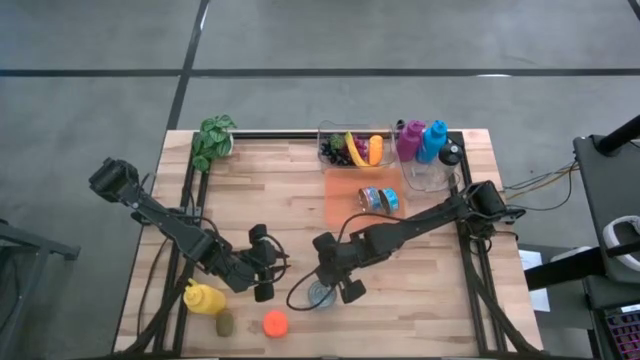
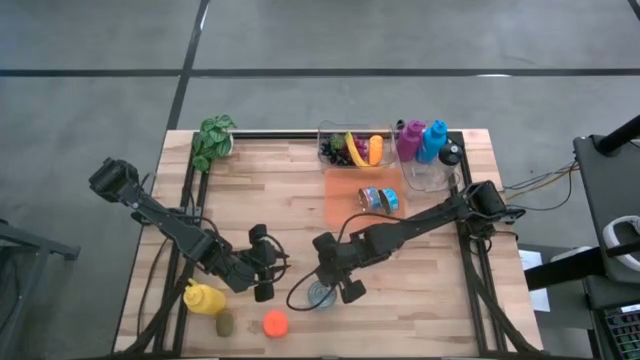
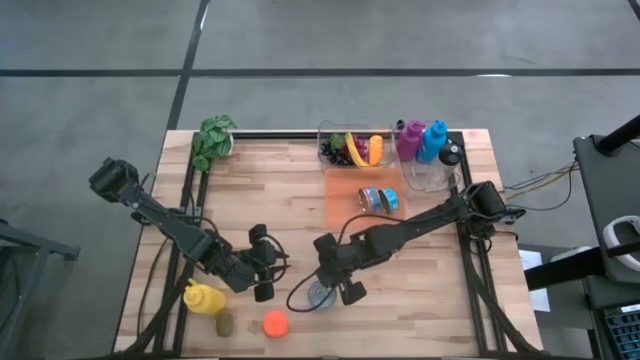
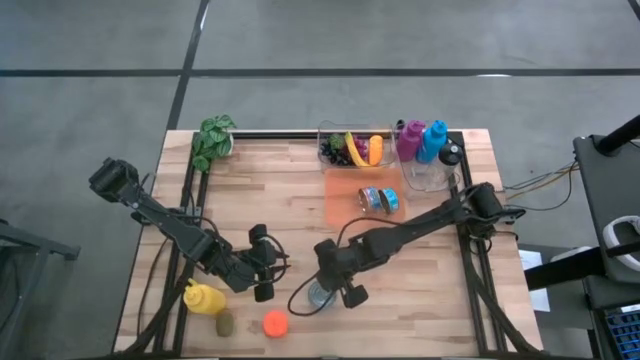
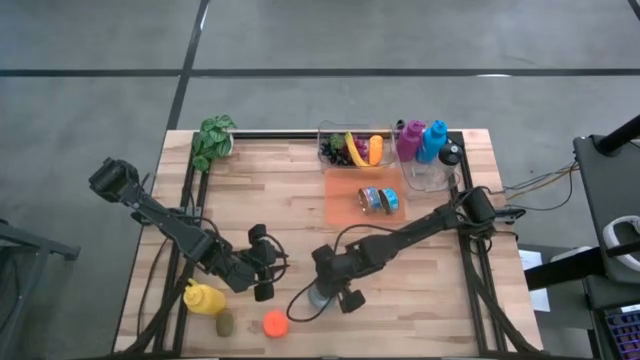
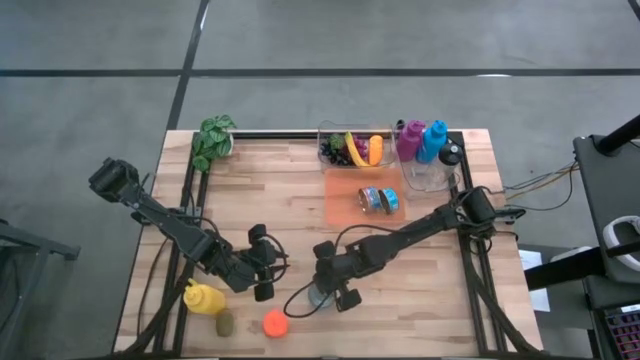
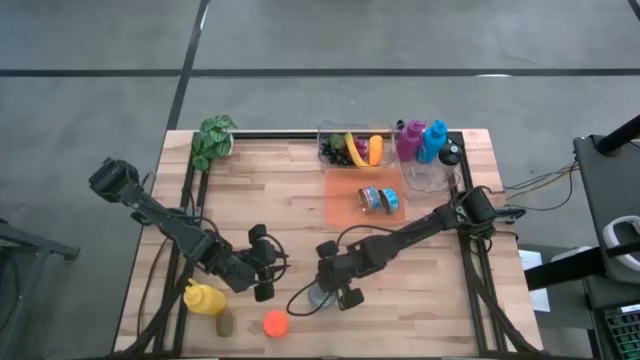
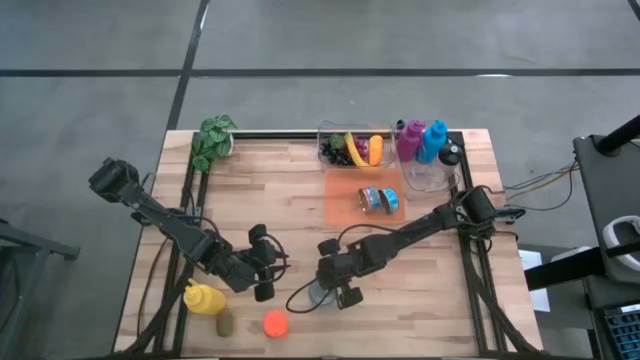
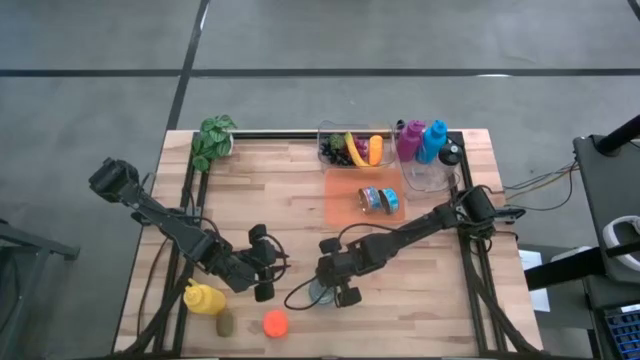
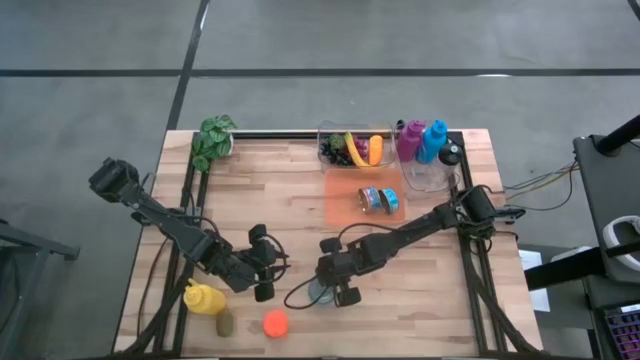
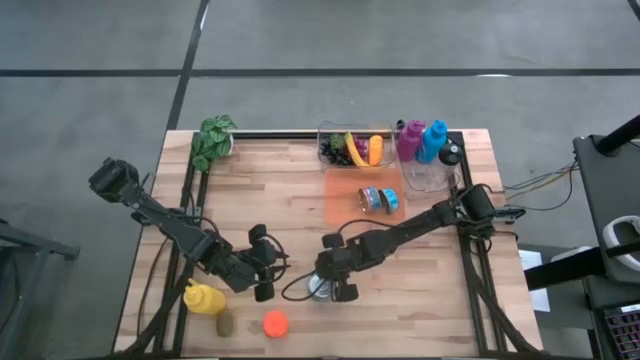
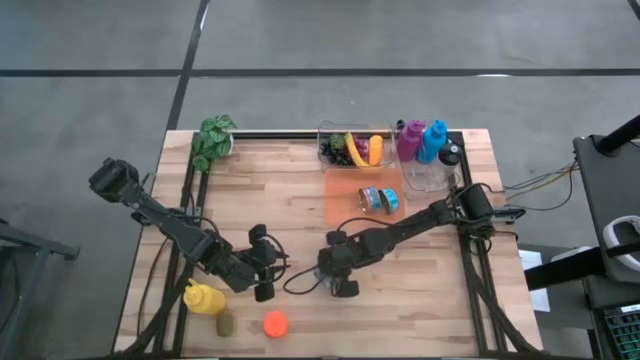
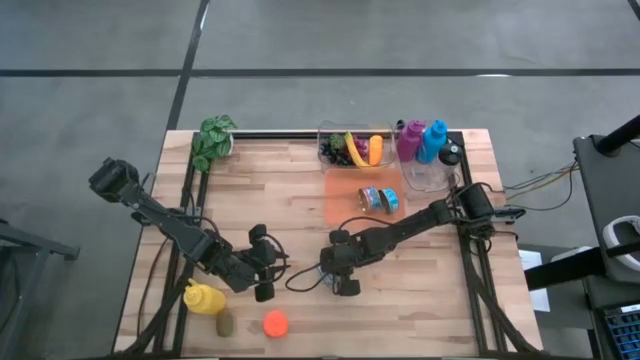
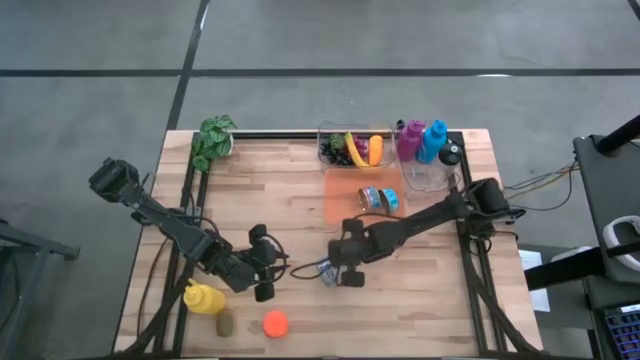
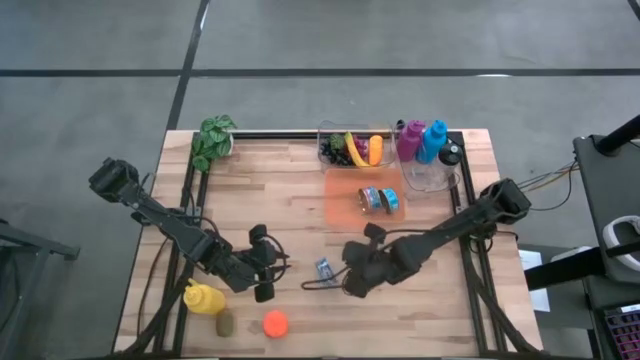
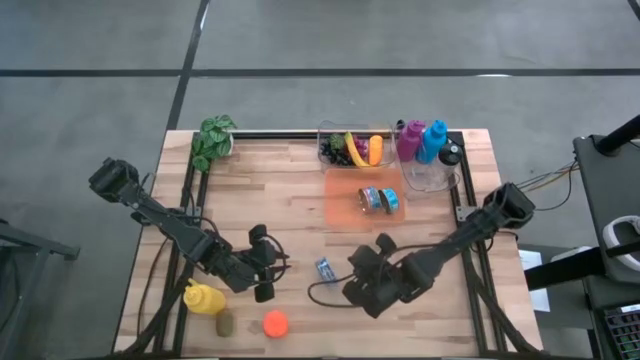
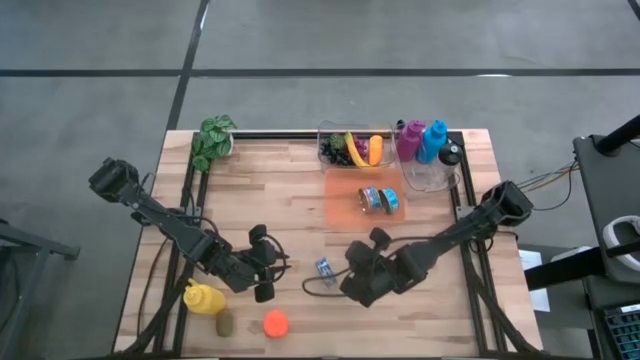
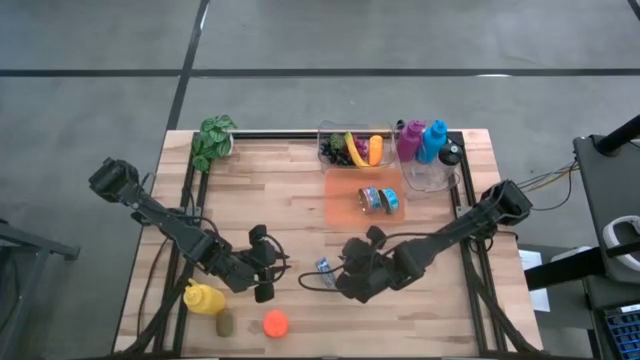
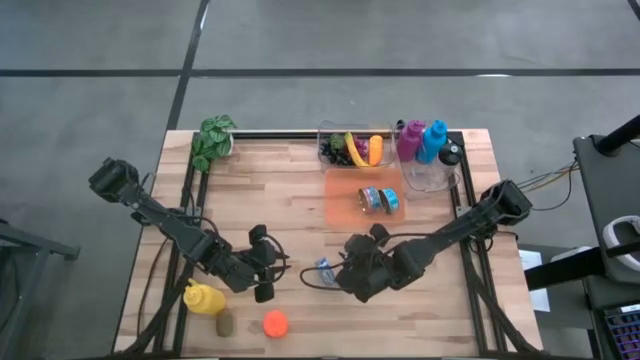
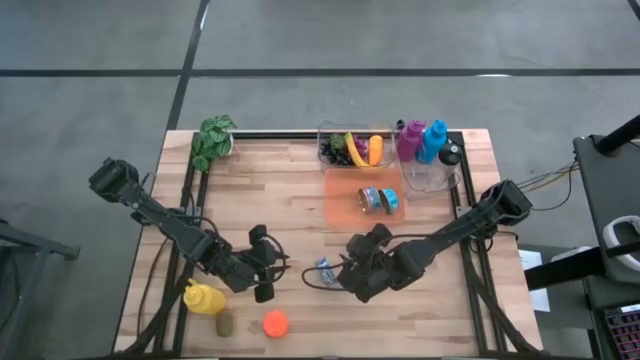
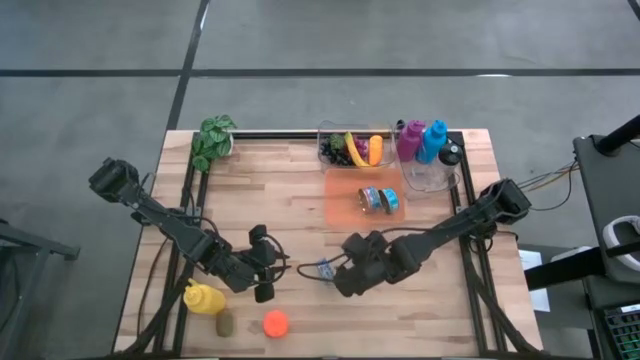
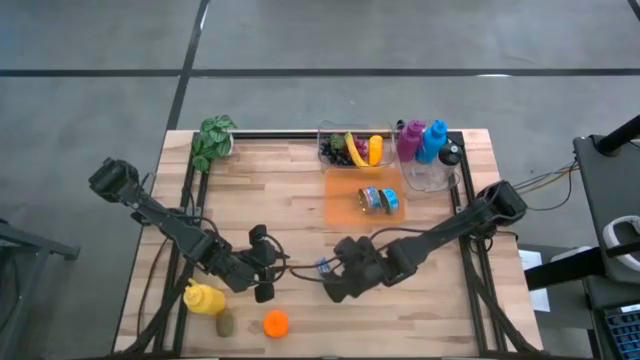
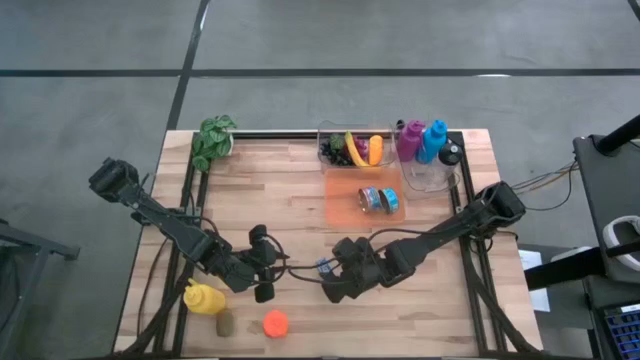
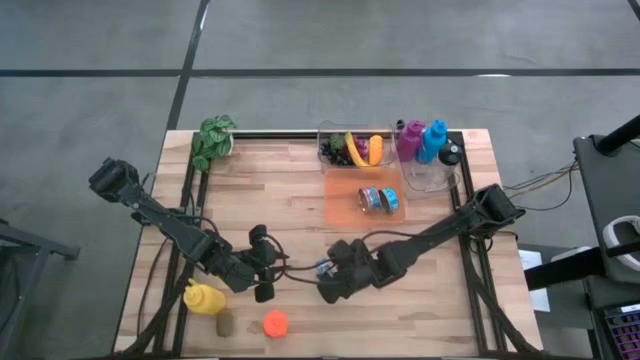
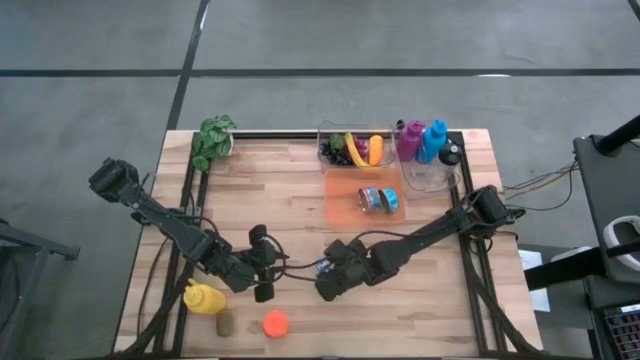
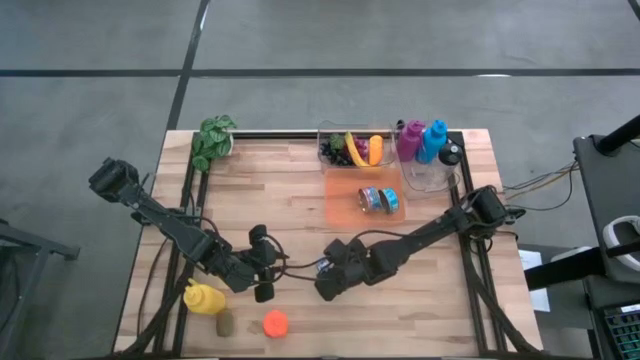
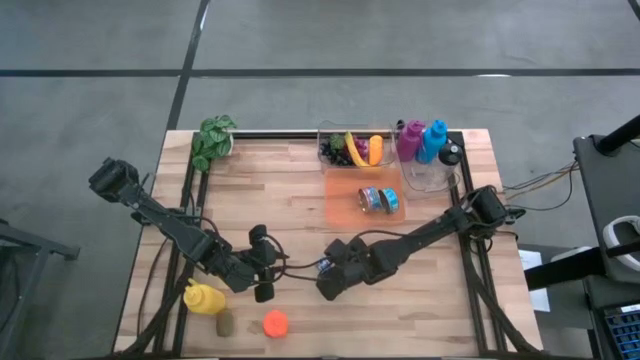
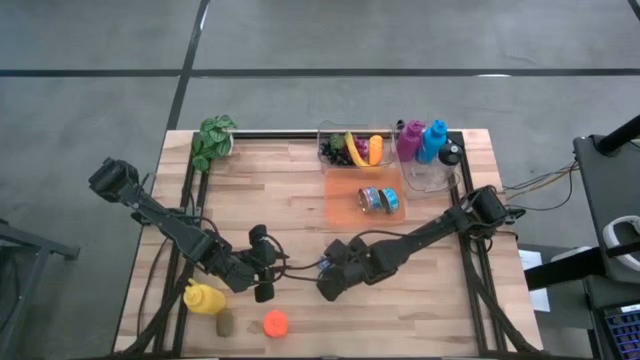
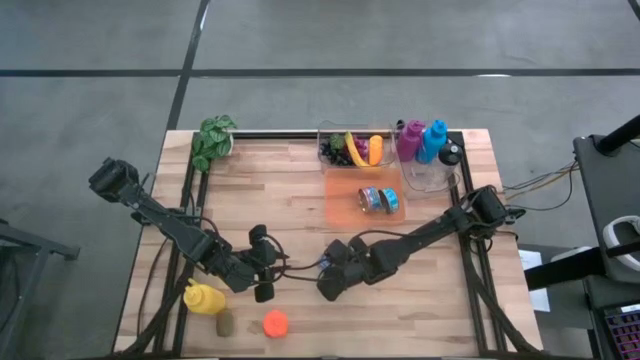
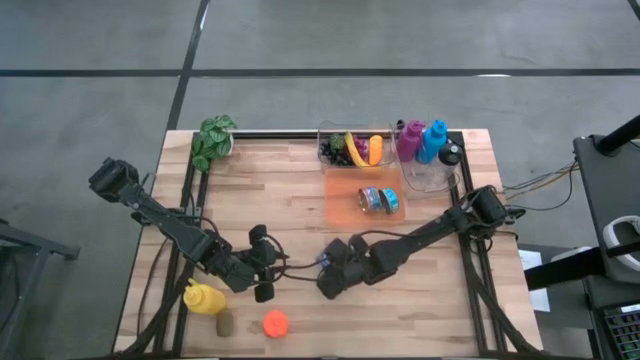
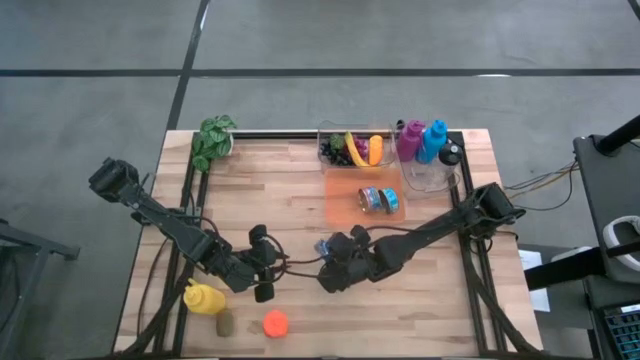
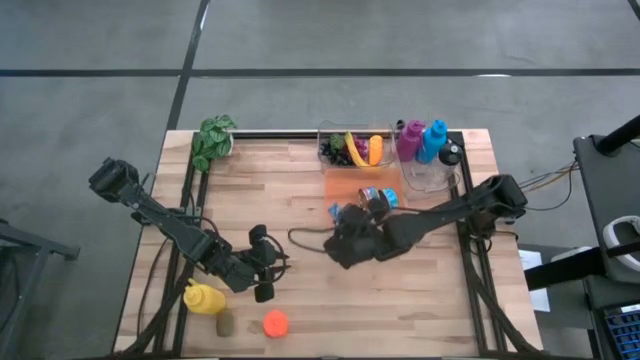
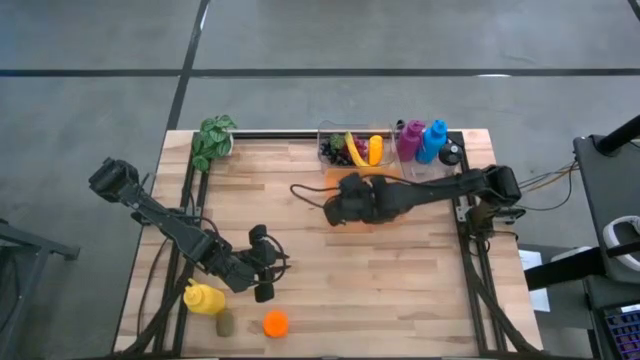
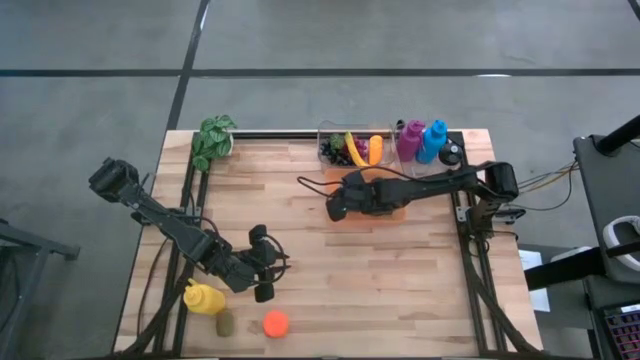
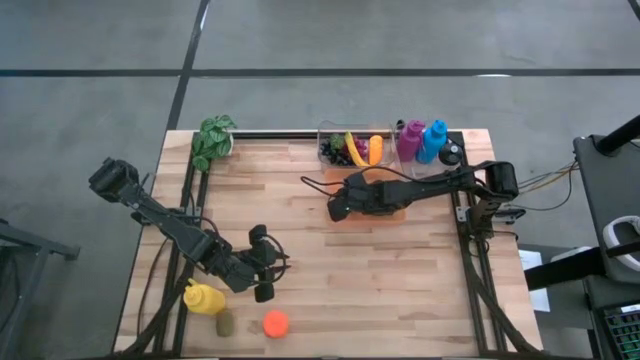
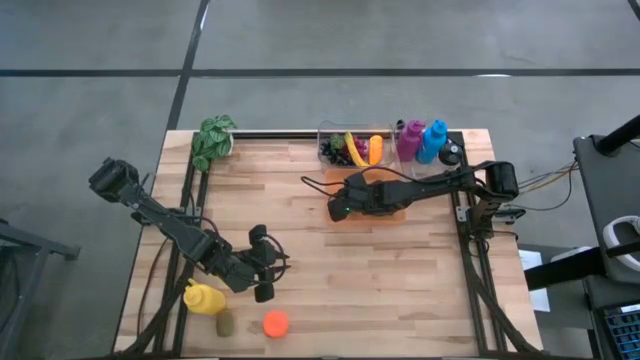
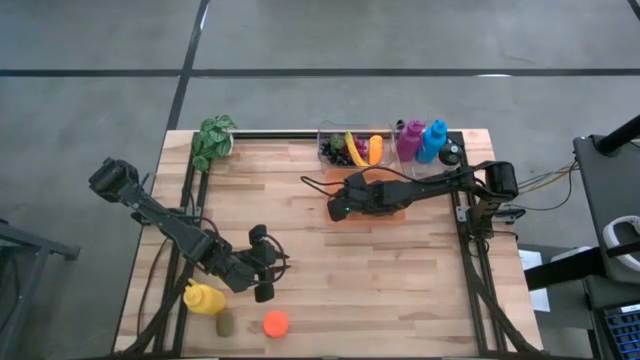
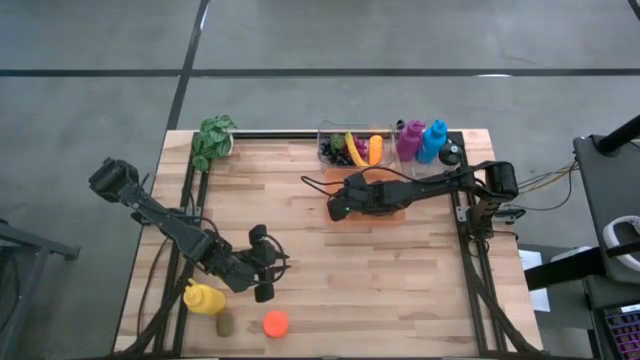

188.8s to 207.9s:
Task: Pick & Place Food Item
Put the blue tuna can into the orange bin
